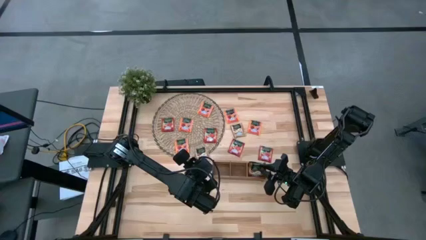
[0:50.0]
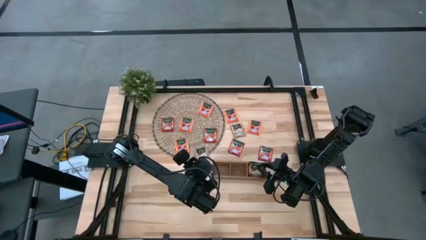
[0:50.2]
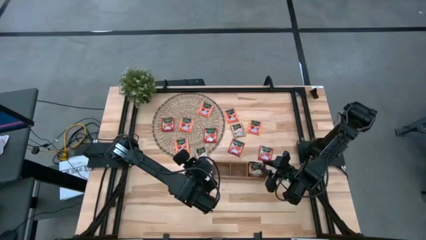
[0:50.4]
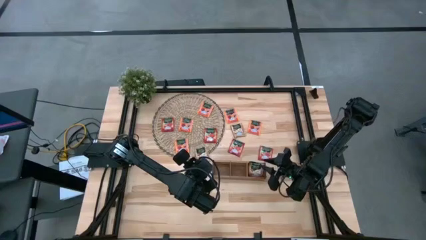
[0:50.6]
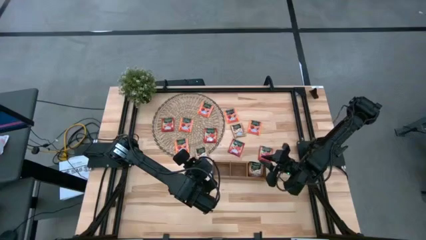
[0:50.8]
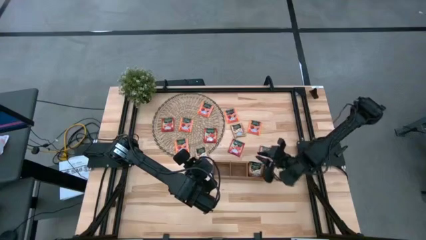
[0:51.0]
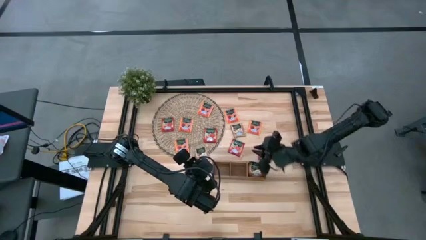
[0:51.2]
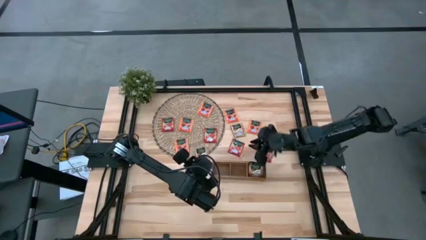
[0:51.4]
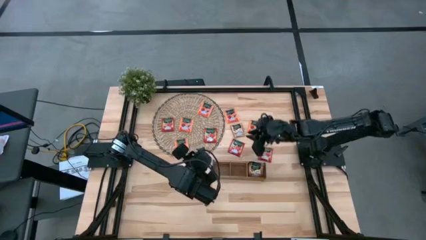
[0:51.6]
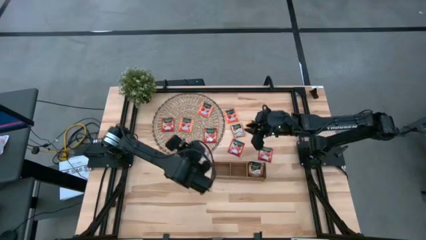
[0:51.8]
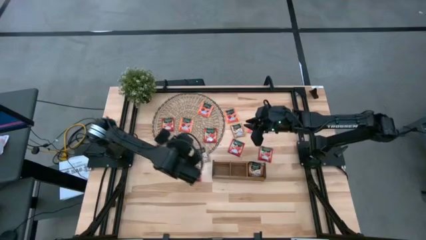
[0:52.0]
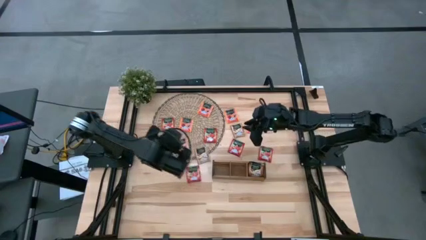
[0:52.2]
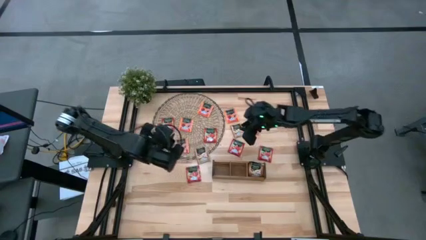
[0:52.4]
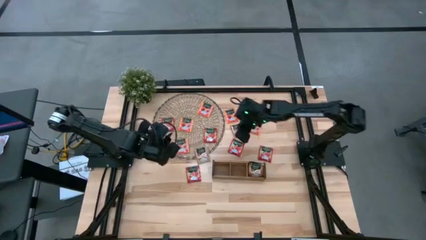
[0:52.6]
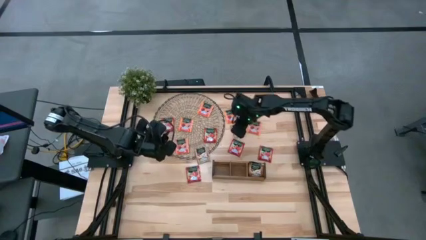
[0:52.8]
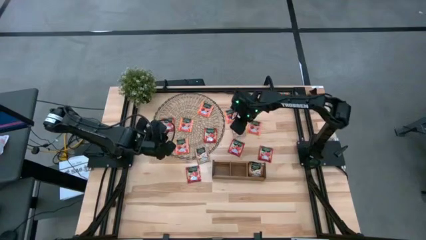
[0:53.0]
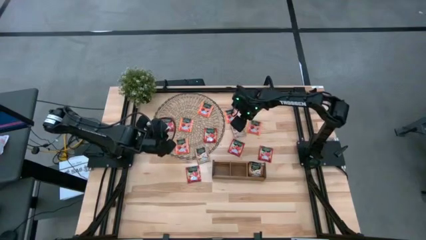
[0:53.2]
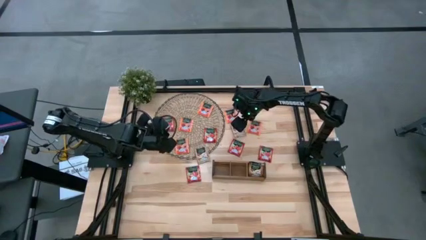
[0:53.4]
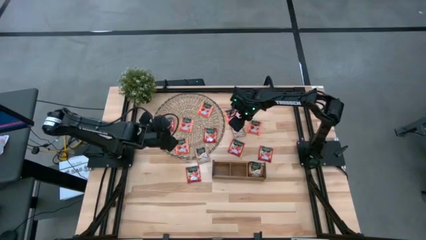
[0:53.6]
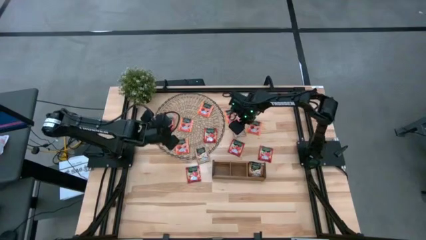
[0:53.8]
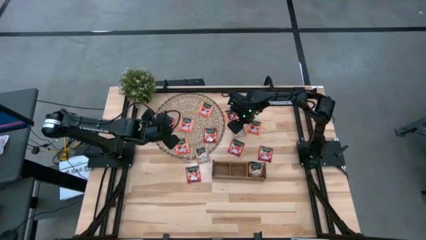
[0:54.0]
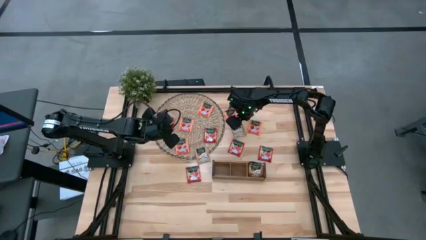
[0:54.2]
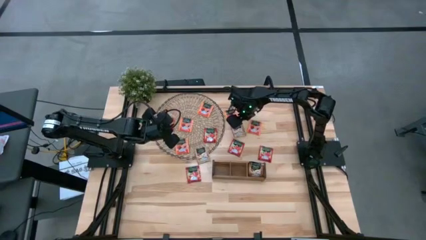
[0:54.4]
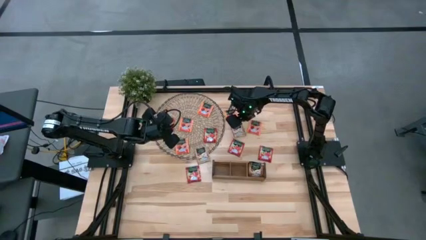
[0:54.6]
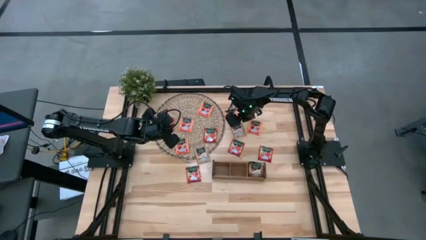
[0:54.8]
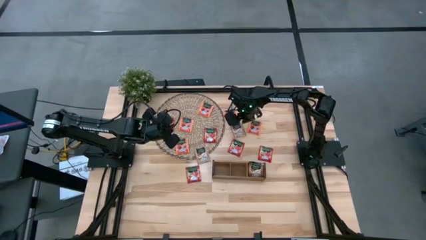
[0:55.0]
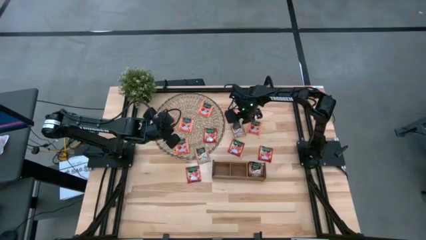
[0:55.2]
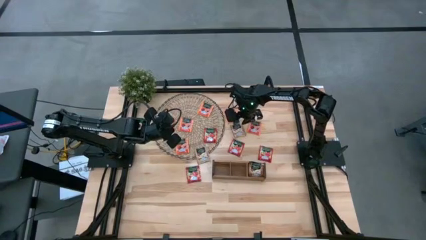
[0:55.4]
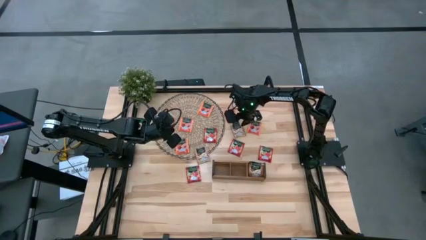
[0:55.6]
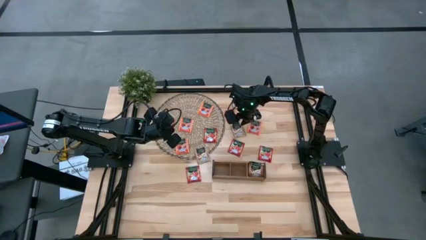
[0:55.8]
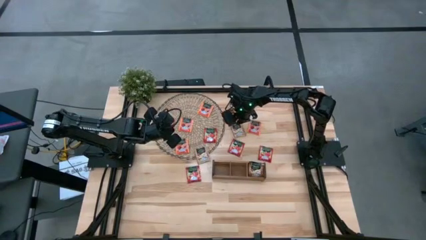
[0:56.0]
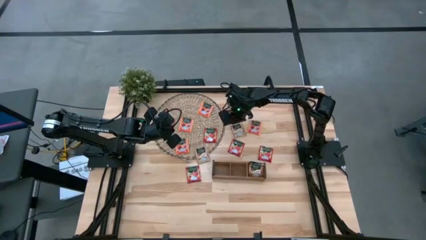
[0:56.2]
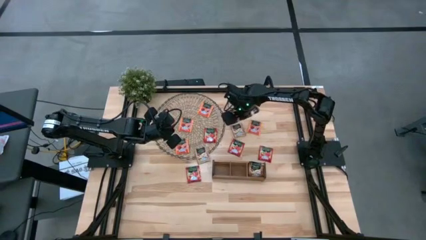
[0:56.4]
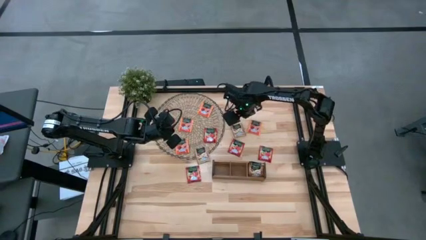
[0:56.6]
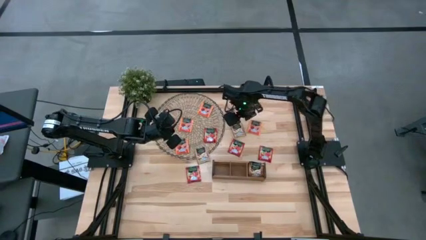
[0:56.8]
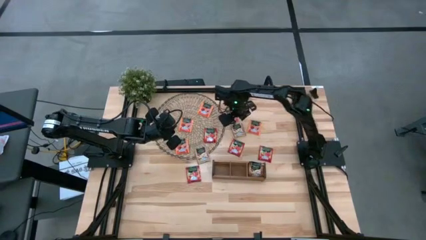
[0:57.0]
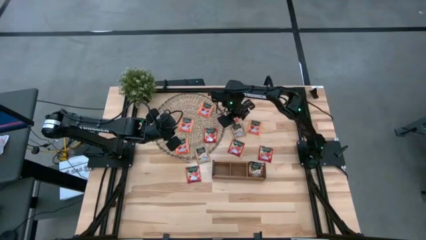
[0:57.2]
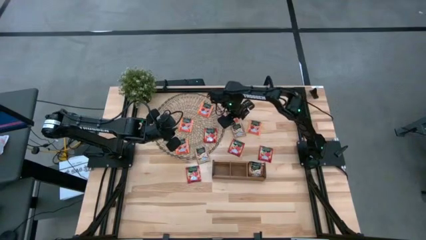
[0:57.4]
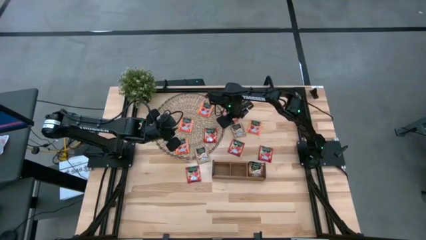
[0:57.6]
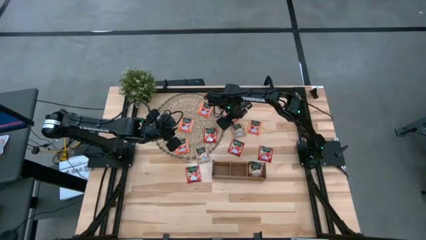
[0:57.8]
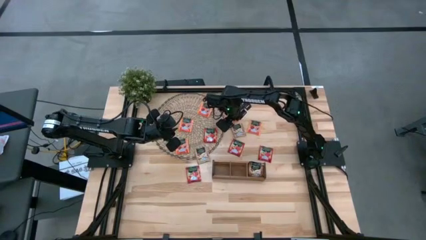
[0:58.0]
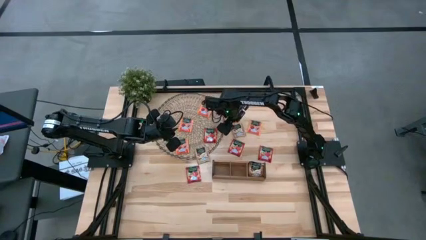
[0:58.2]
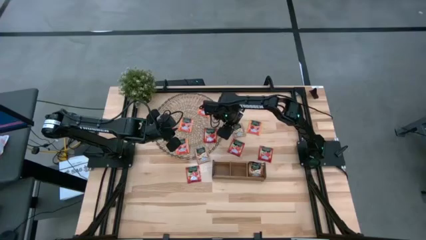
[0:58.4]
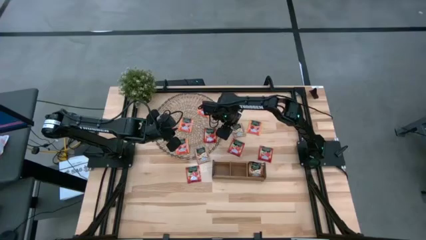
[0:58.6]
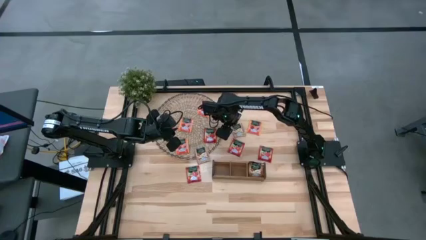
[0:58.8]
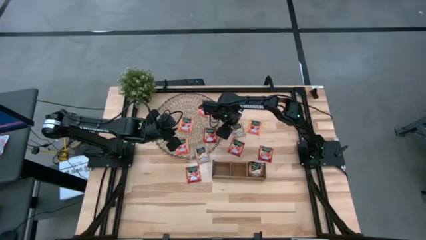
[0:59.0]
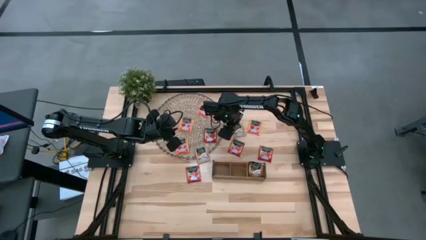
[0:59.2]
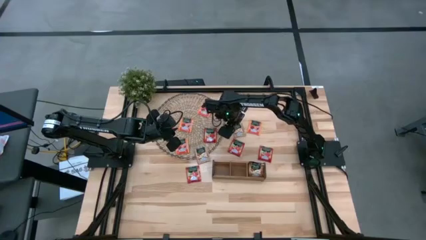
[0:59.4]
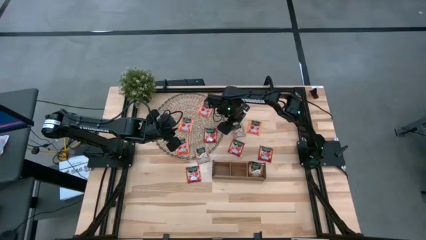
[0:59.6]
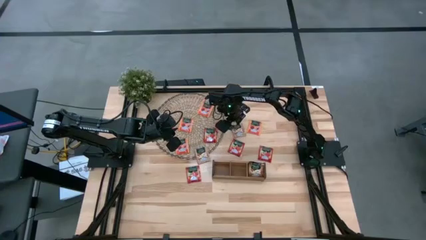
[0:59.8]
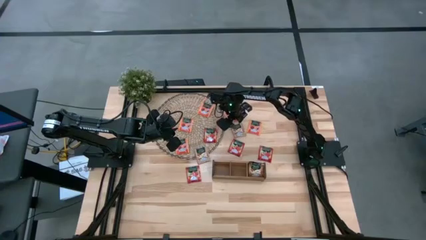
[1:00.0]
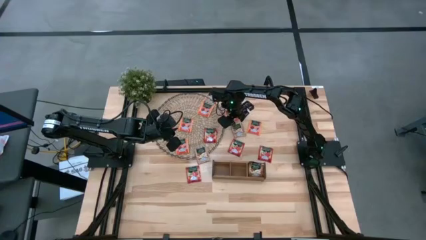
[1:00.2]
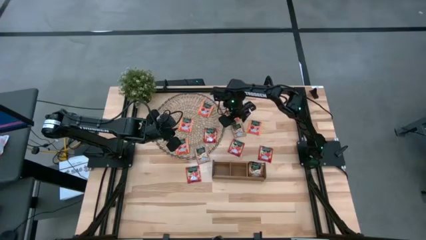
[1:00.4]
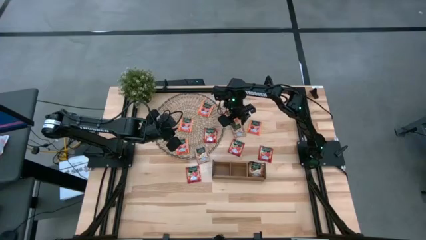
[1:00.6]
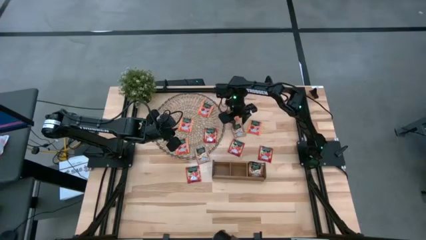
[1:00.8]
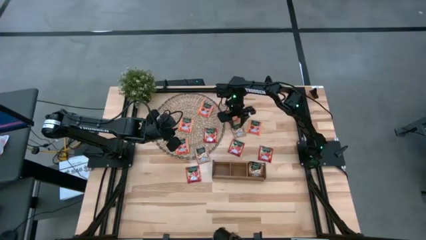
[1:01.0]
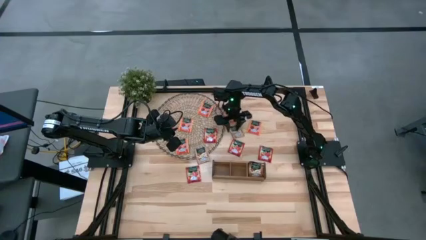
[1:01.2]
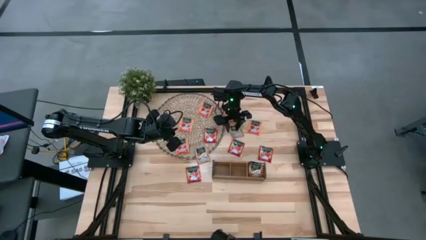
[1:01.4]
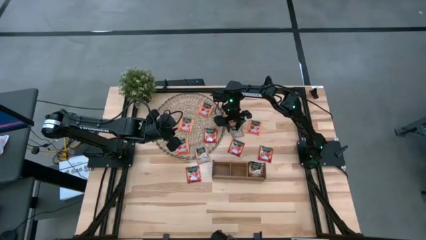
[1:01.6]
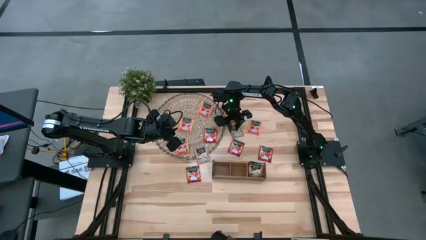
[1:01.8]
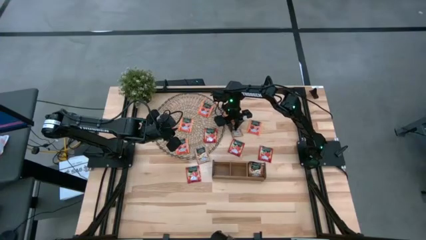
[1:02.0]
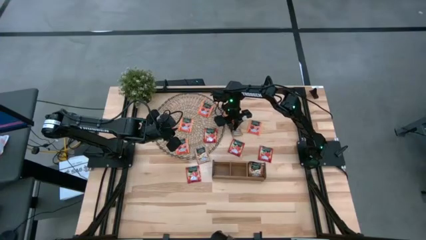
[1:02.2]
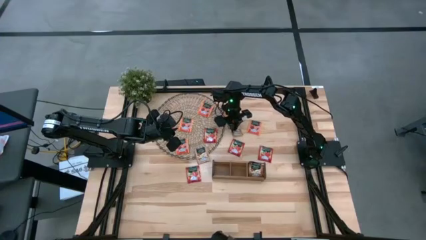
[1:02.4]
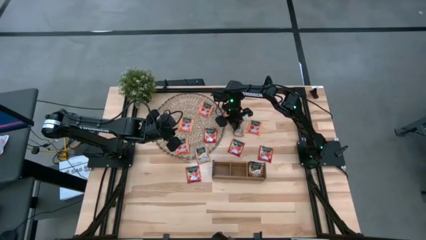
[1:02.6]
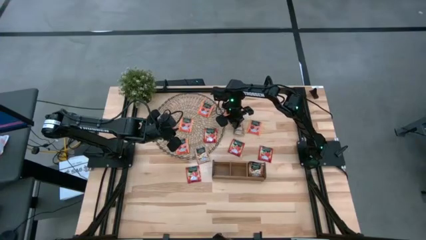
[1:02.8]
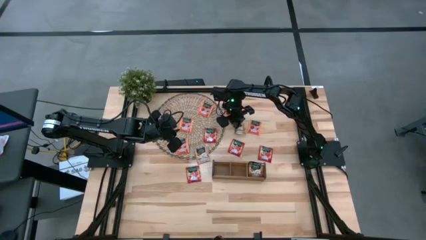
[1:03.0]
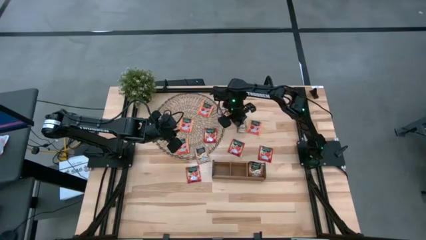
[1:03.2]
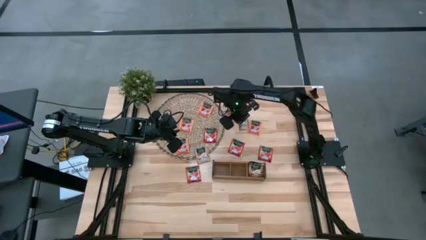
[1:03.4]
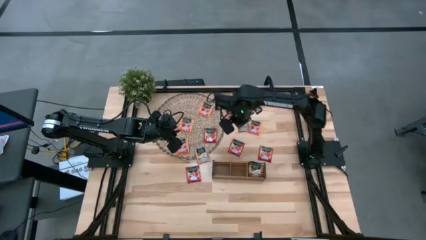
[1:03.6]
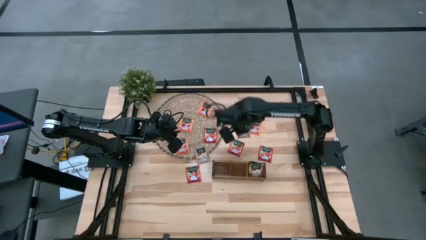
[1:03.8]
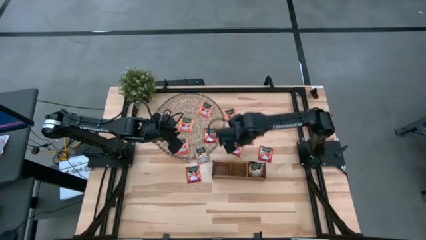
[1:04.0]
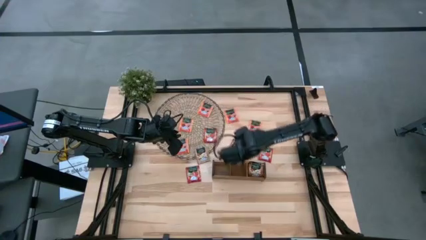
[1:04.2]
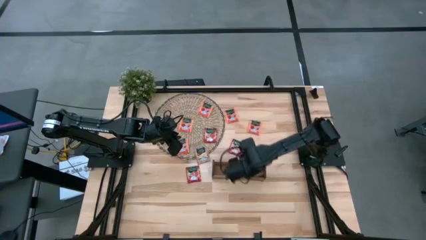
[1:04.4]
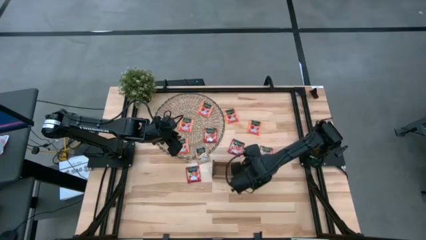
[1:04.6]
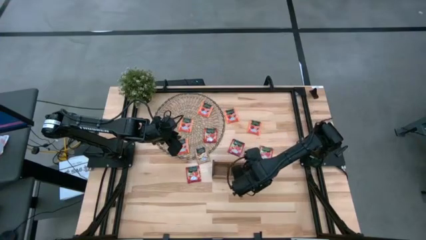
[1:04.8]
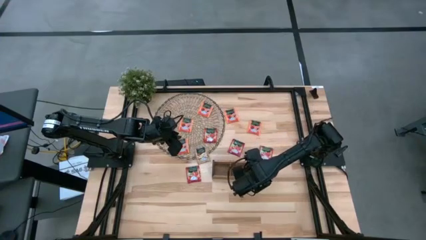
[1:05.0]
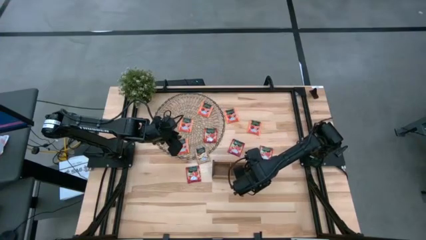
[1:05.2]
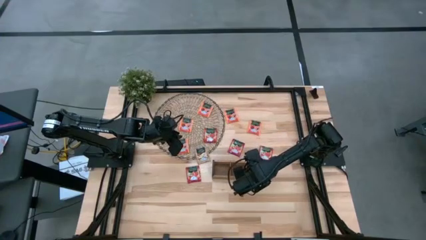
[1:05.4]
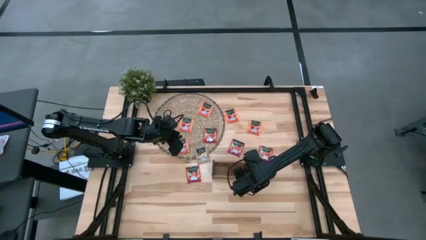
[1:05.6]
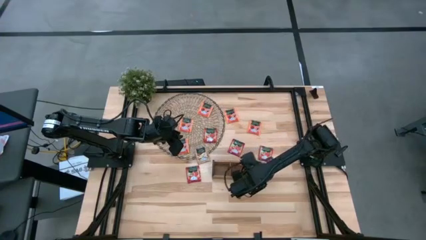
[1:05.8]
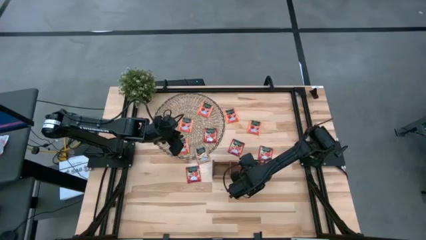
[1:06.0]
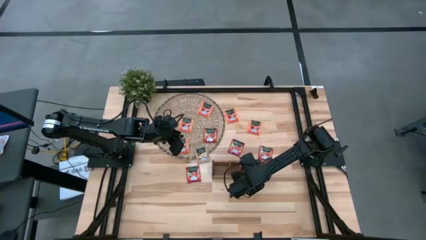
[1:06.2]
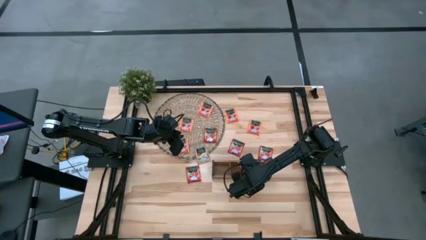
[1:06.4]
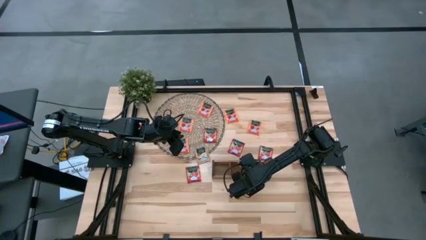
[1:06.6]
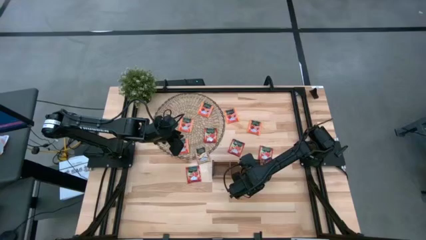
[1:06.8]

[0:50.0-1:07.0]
Task: Pick & Place Tea
Put the top brown tea bag into the right slot of the wooden organizer
